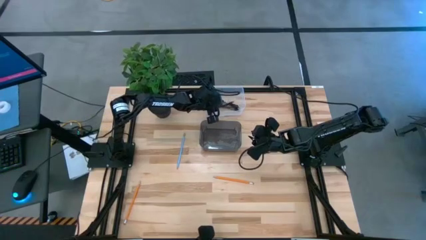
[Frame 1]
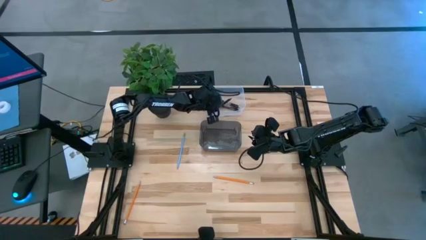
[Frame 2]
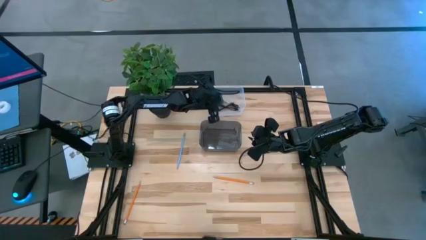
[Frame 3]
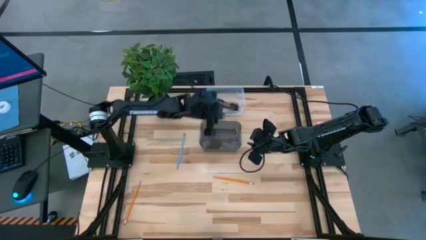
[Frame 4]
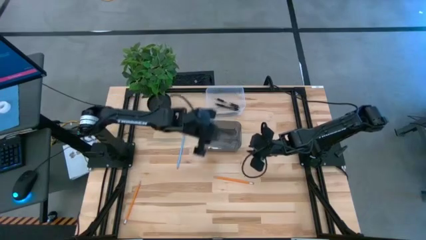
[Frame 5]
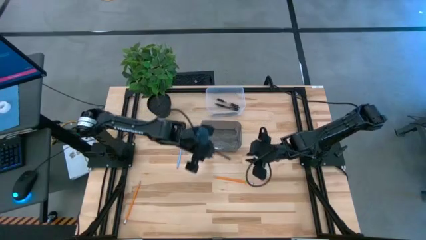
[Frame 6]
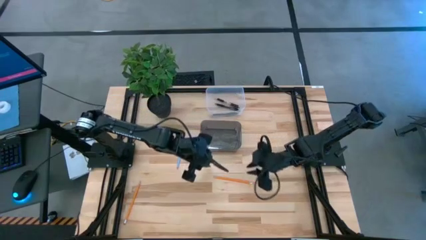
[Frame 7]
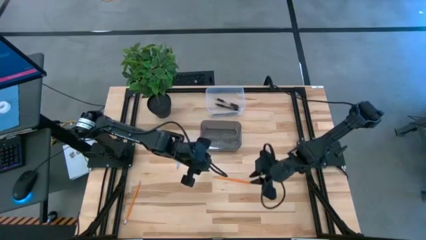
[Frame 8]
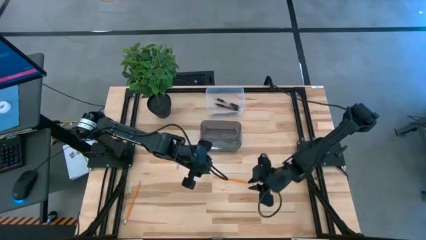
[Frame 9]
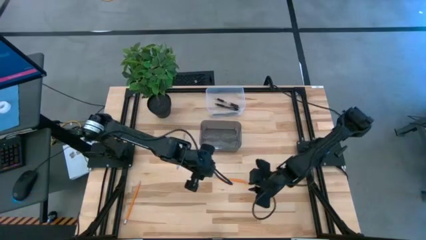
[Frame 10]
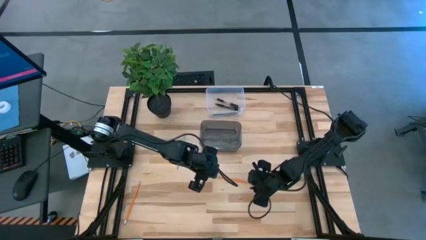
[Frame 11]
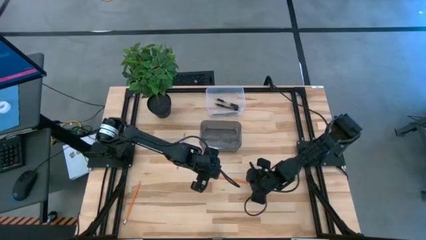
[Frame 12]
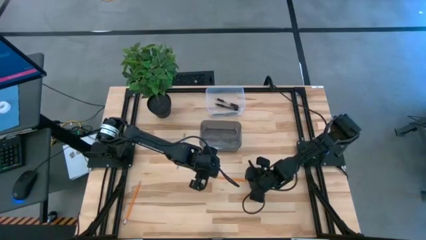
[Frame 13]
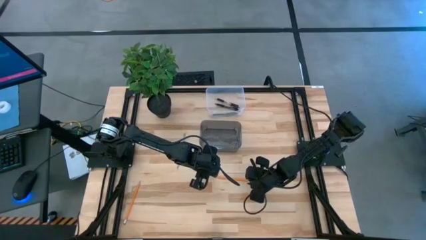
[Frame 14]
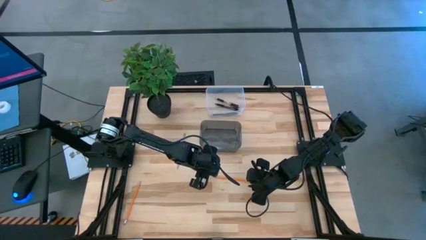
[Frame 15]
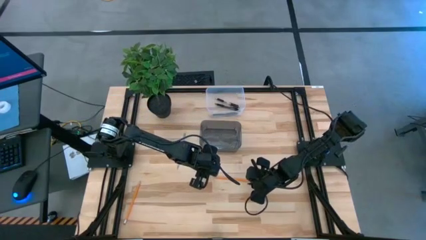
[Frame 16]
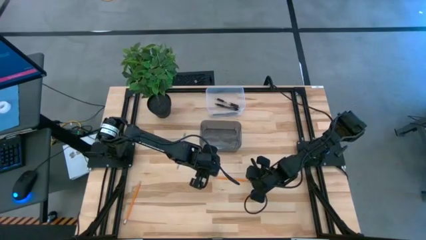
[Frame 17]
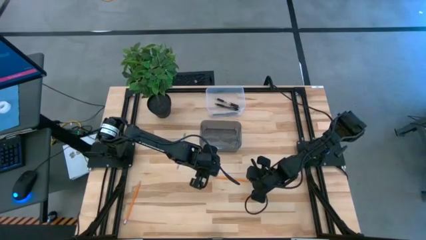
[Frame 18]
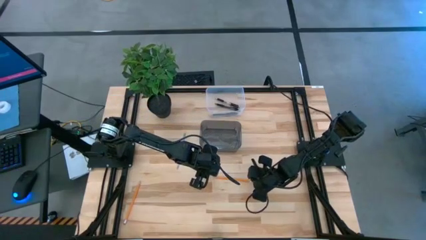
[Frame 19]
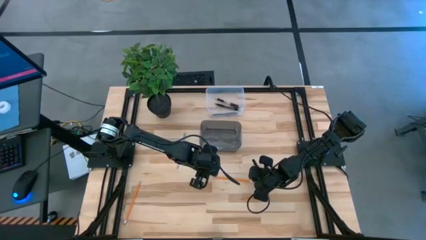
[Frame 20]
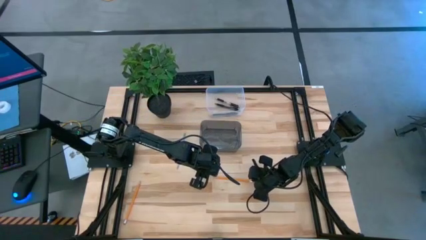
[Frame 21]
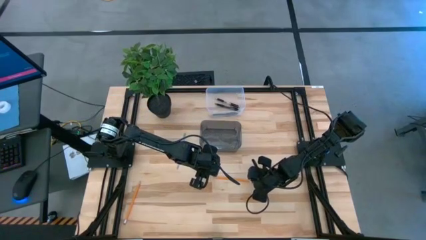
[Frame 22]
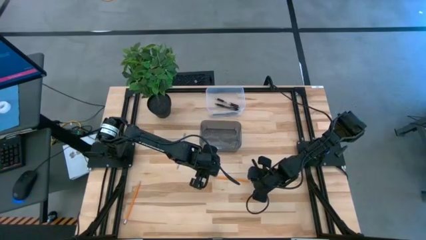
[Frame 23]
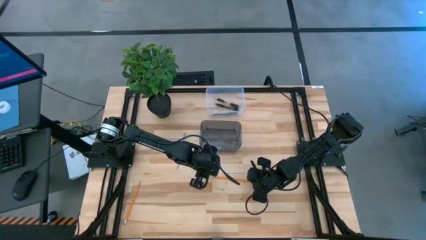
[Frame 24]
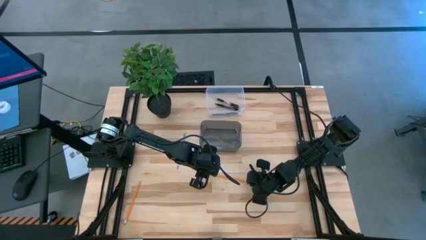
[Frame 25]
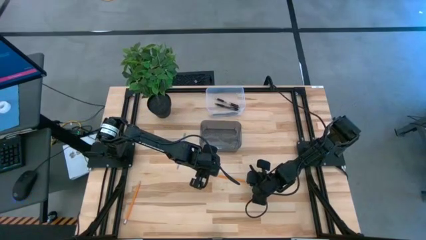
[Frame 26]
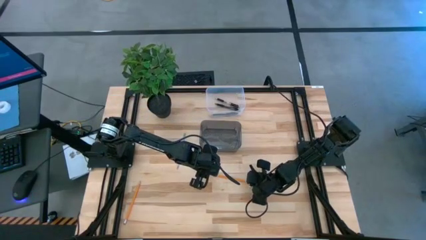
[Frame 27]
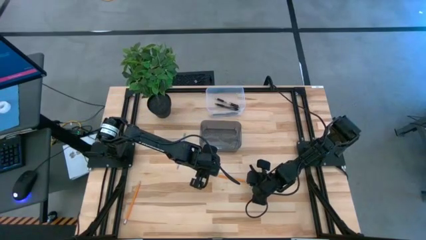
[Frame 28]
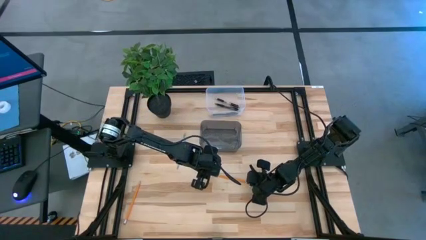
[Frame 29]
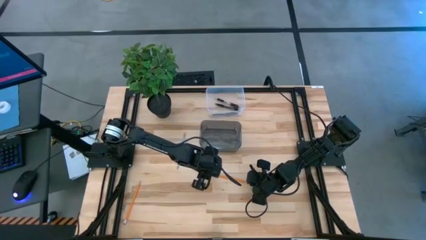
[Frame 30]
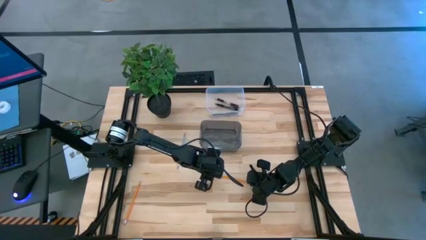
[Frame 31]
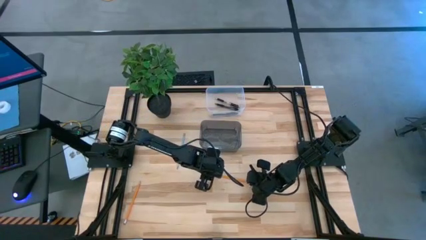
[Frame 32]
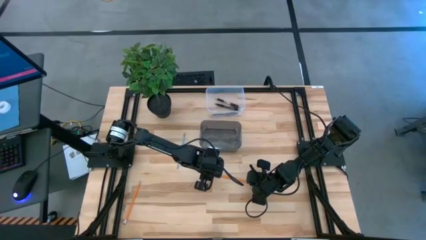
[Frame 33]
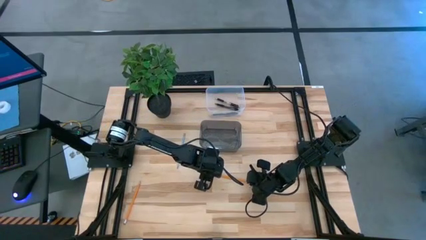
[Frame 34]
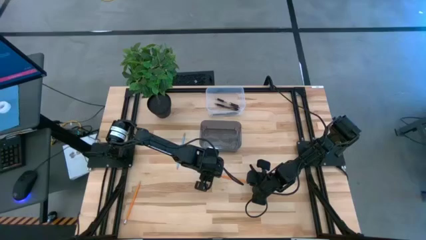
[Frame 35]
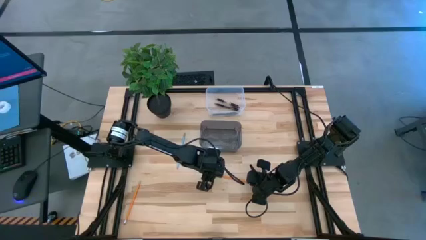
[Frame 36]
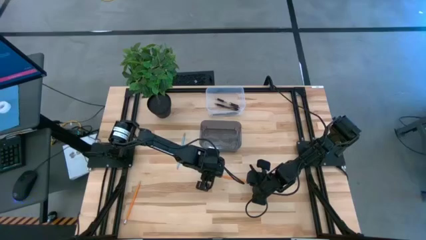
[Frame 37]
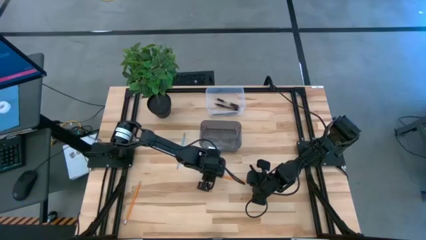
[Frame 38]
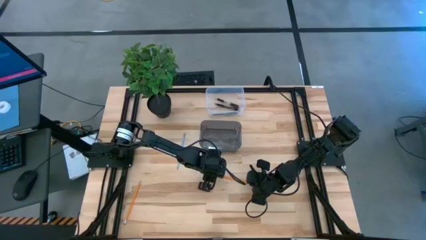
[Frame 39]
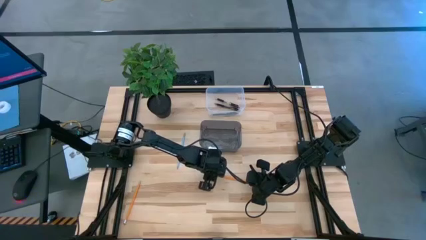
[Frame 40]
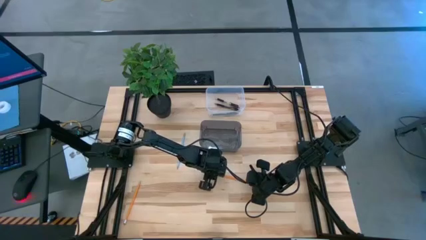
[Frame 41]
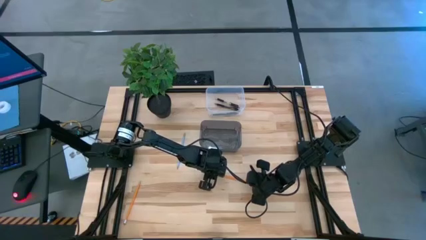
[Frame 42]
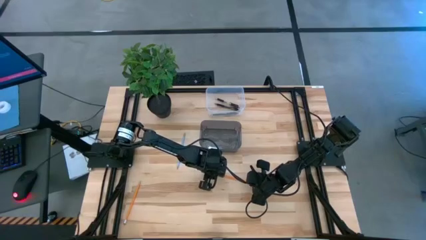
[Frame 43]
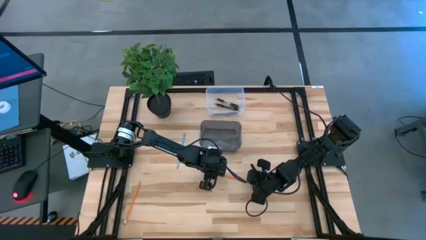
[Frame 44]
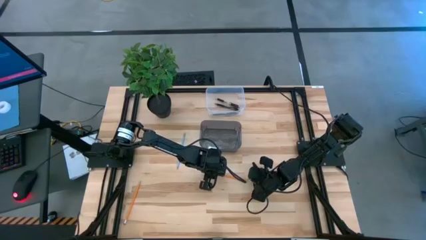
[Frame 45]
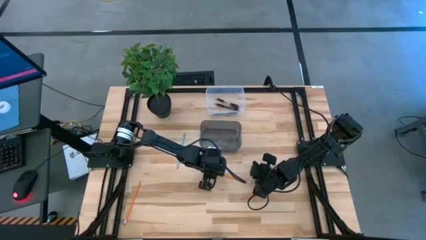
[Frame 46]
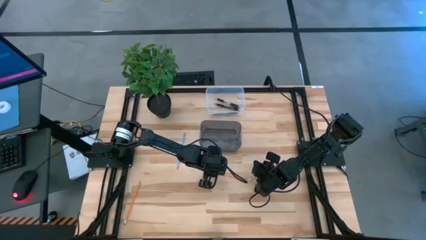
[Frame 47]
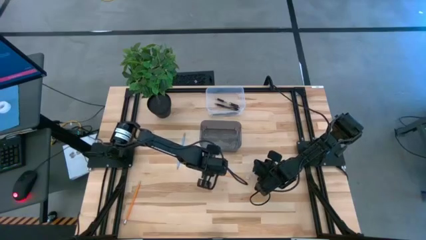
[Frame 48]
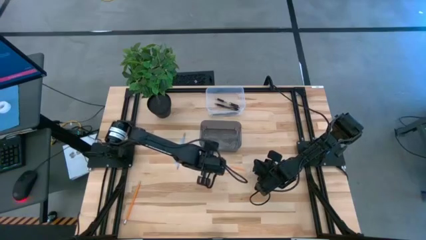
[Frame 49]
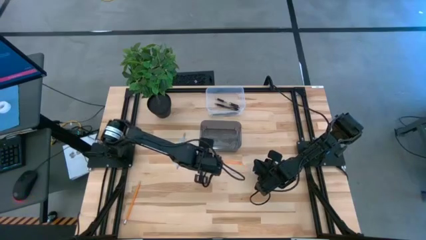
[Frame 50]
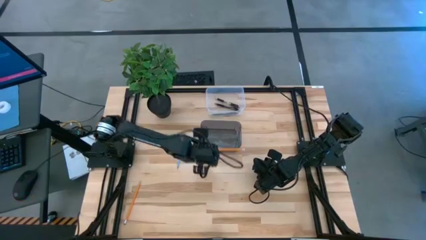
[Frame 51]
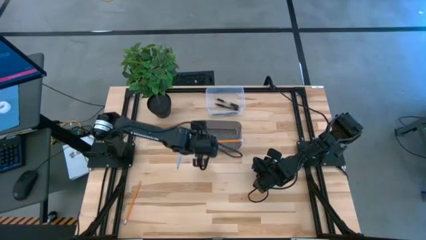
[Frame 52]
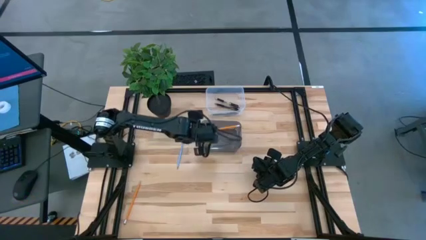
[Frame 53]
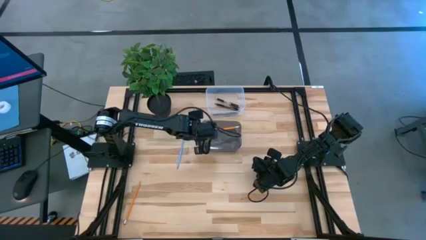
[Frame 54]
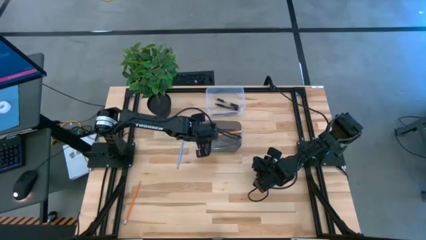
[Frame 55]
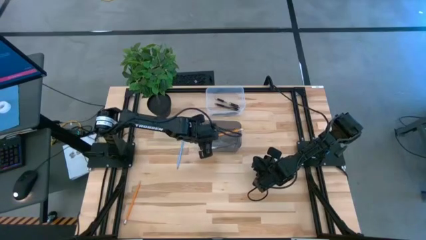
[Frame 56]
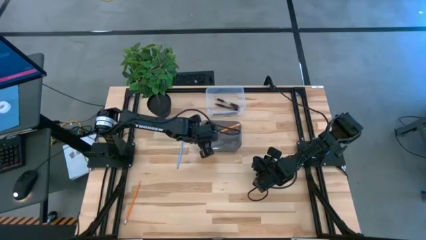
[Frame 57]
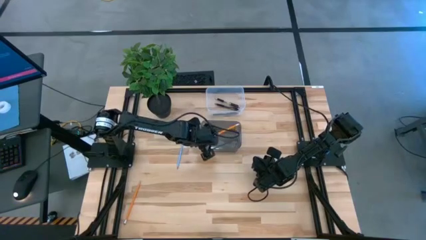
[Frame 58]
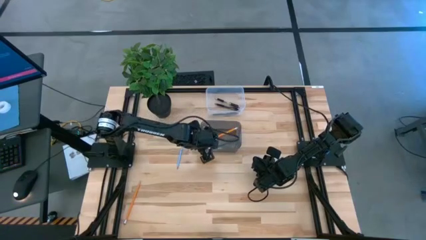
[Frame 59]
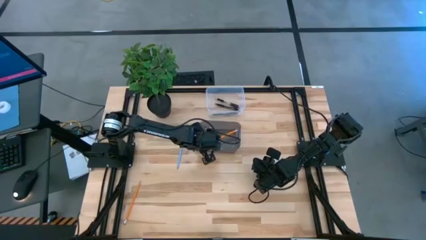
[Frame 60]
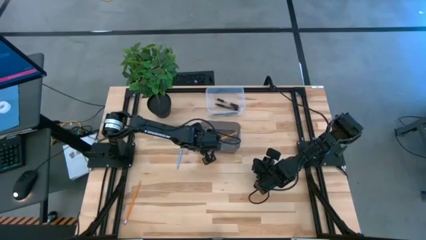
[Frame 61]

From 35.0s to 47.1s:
Task: Sort pens & pencils
Put the right orange pencil into the black bin
